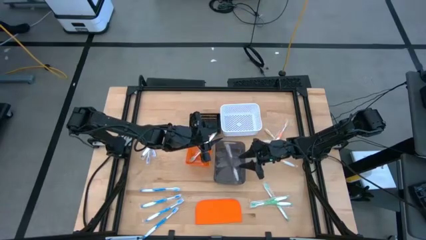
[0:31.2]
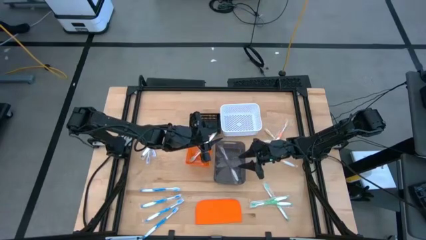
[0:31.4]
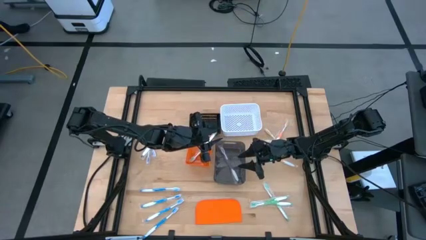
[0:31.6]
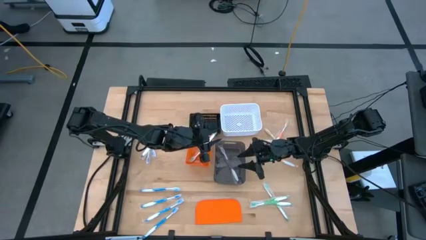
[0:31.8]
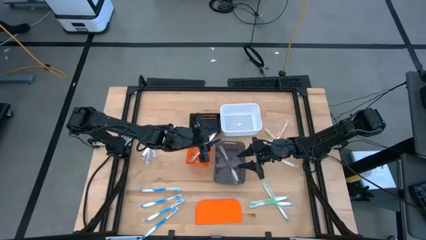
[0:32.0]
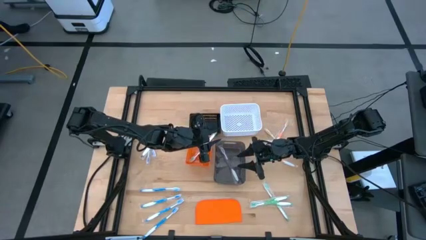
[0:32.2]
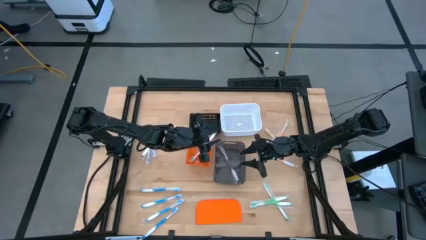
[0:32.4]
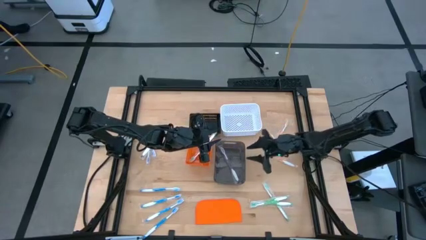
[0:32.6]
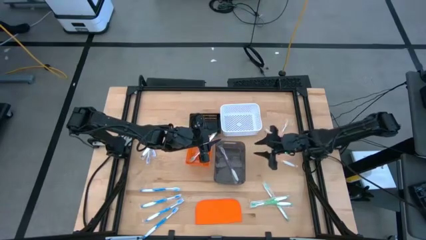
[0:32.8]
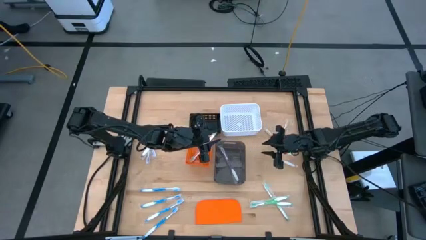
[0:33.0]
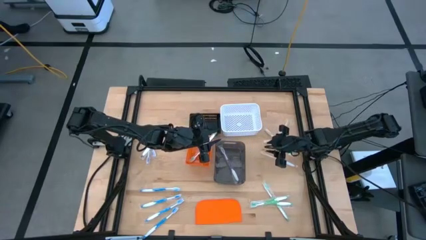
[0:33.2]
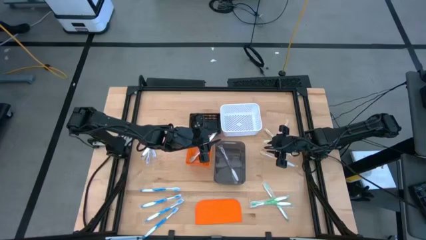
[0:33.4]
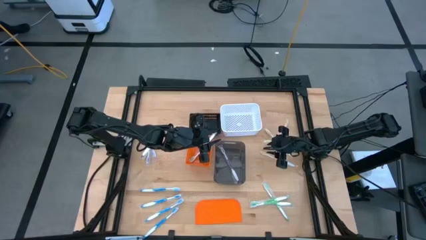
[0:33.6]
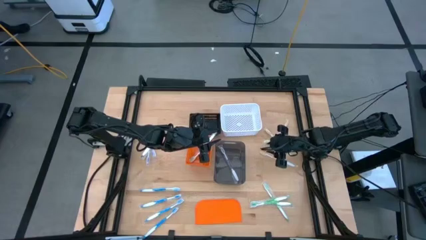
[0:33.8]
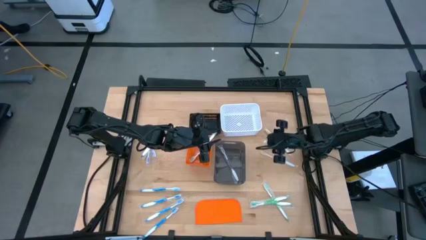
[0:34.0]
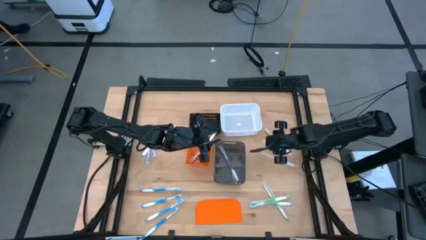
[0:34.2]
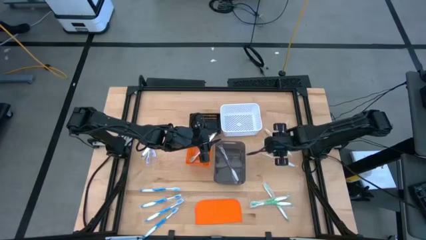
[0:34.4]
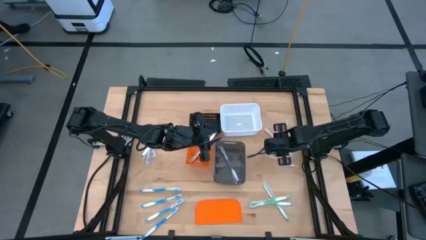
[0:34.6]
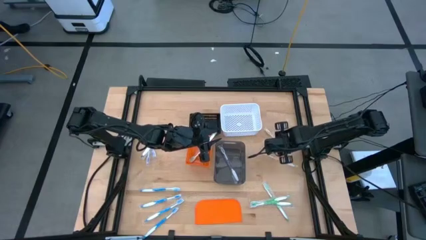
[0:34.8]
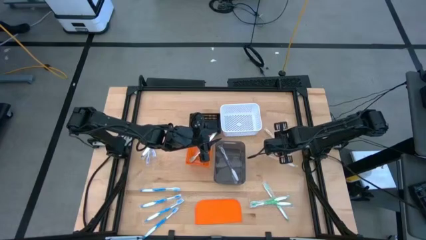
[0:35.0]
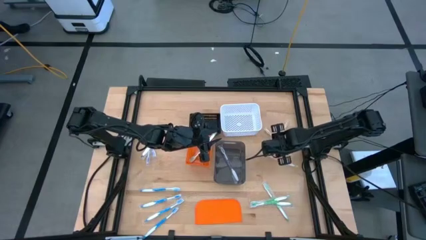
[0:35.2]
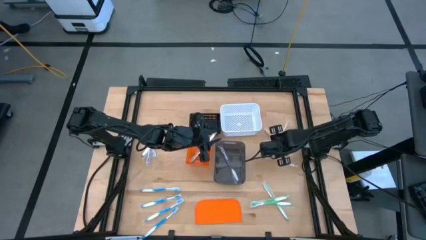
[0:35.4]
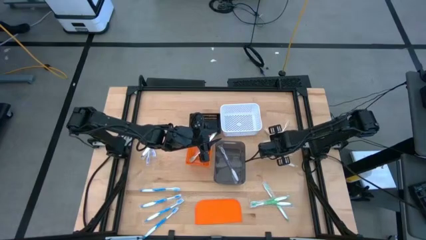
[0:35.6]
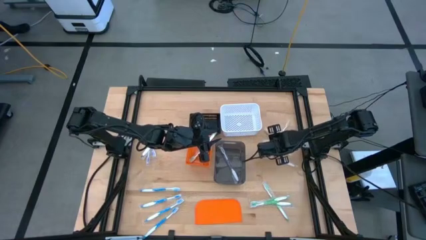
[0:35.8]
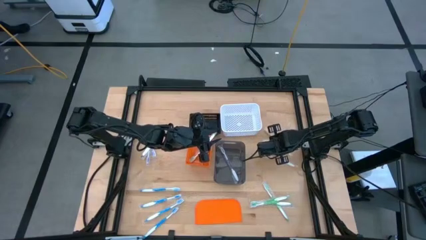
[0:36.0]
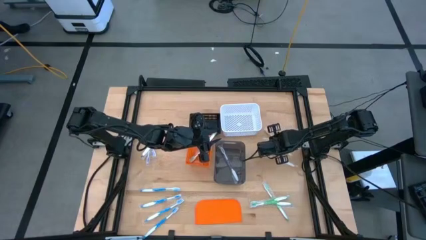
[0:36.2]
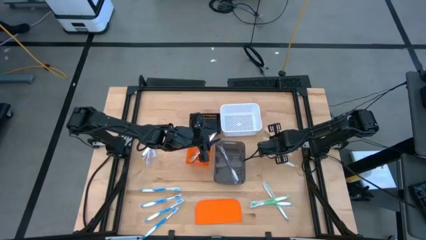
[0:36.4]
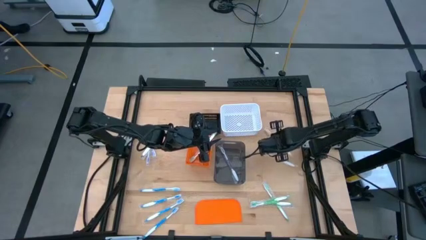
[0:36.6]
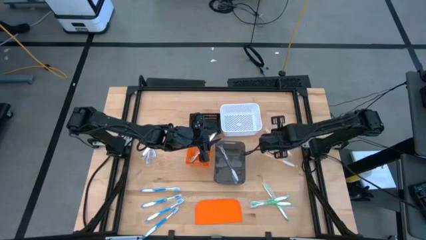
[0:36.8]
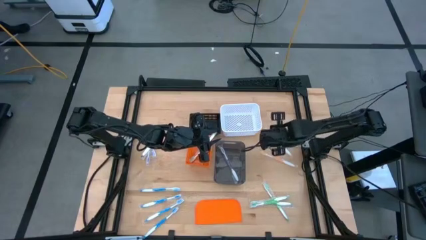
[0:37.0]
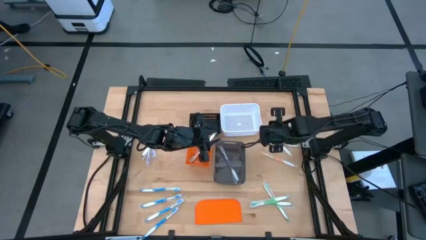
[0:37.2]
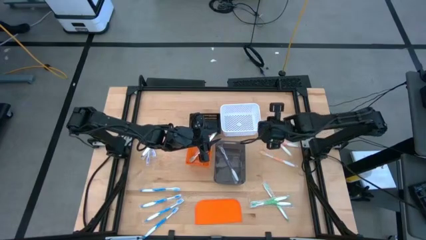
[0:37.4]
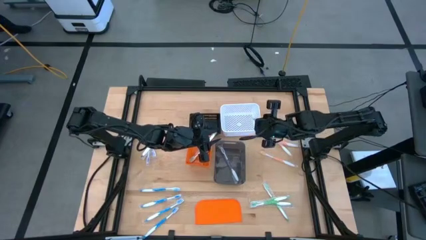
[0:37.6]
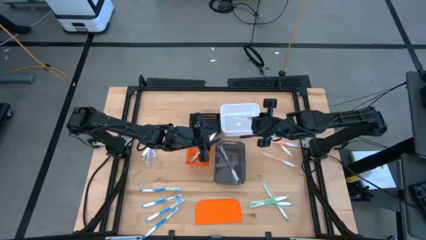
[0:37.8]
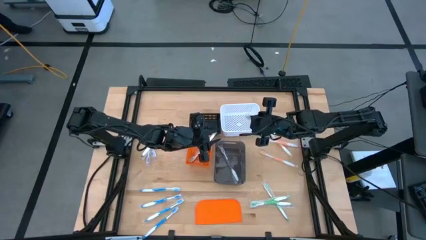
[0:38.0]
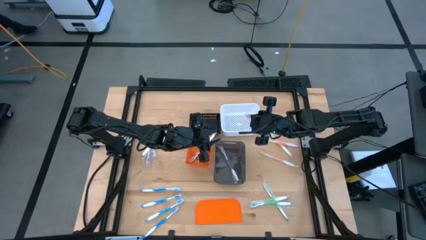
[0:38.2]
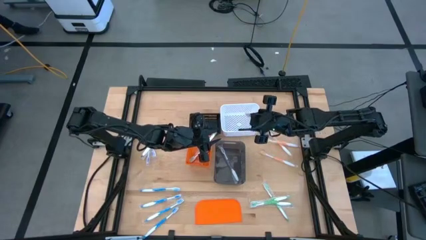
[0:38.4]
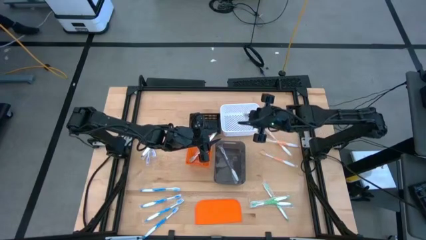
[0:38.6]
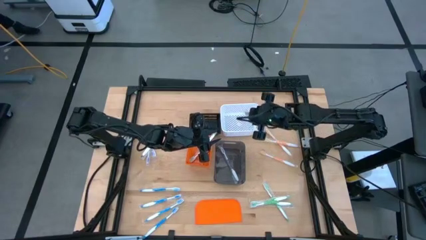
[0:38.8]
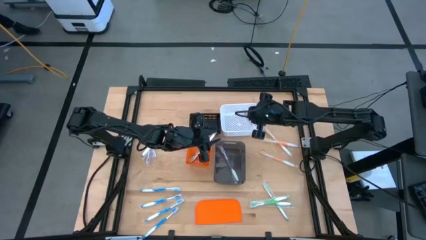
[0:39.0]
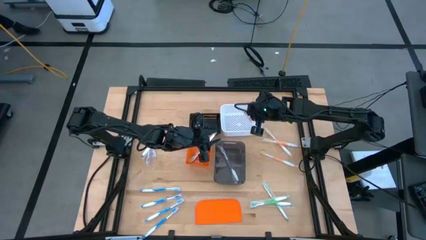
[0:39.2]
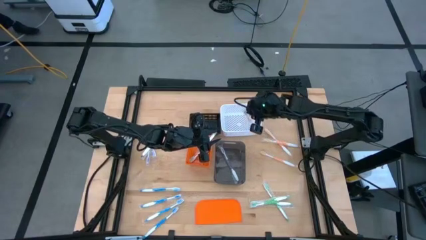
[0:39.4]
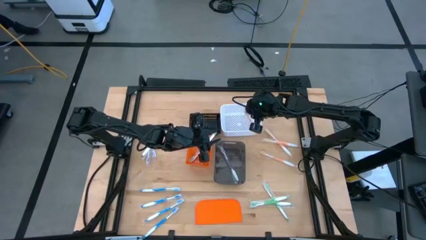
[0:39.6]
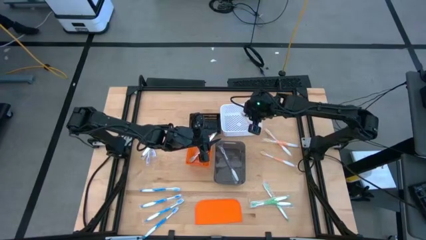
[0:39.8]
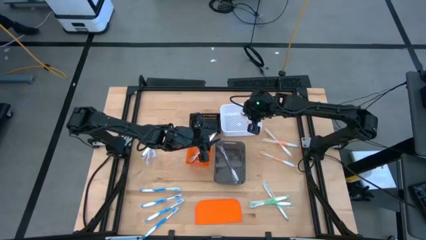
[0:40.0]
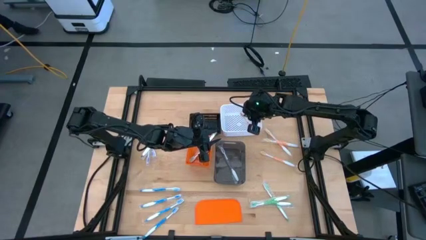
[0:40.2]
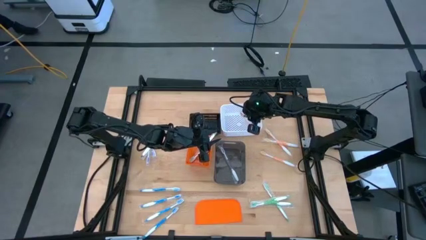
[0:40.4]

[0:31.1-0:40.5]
Task: Pick & Place Toothbrushes
Put the orange toothbrush into the white bin

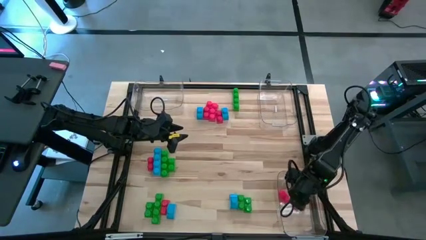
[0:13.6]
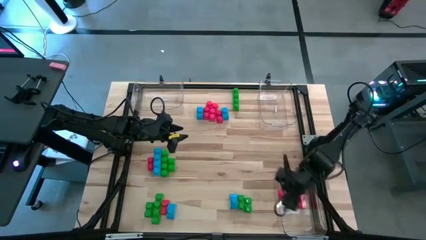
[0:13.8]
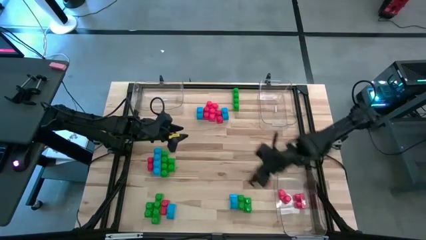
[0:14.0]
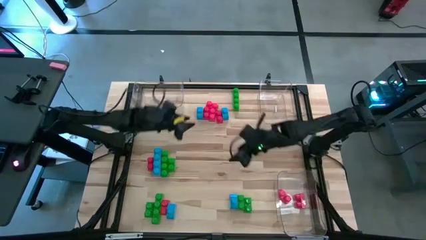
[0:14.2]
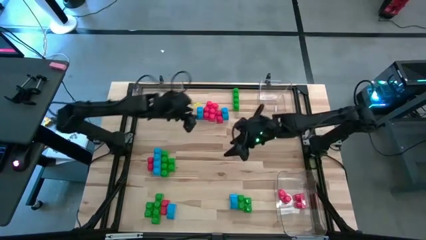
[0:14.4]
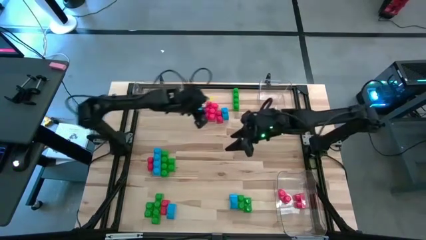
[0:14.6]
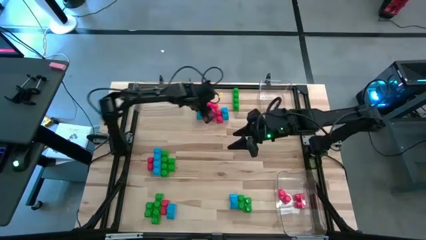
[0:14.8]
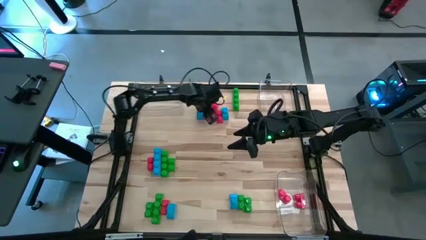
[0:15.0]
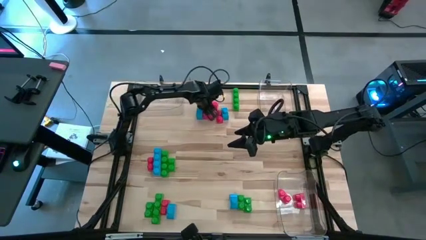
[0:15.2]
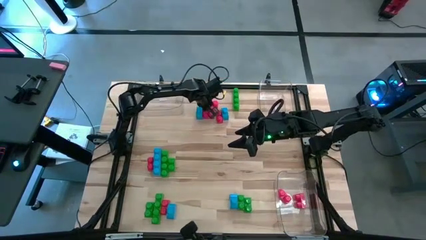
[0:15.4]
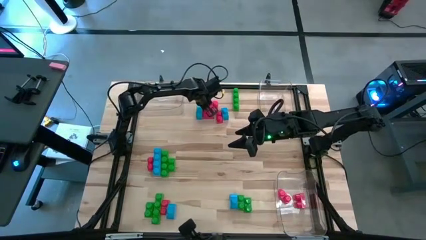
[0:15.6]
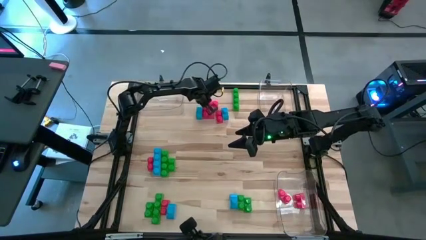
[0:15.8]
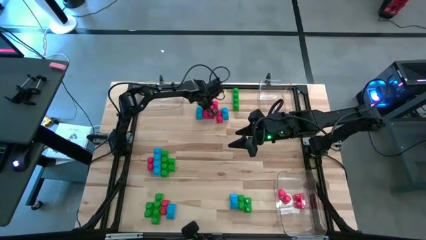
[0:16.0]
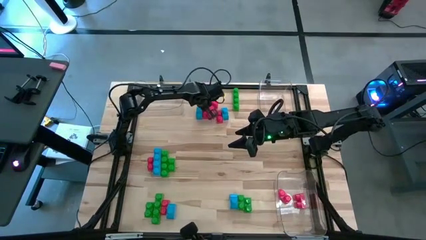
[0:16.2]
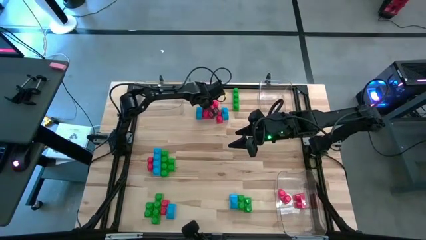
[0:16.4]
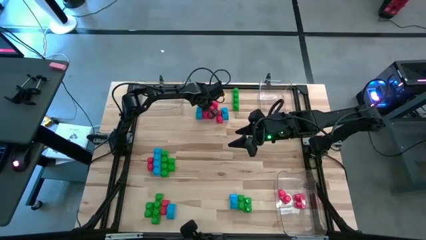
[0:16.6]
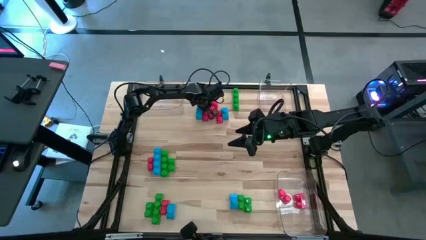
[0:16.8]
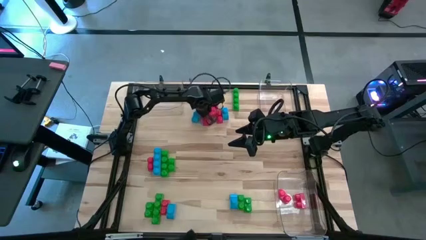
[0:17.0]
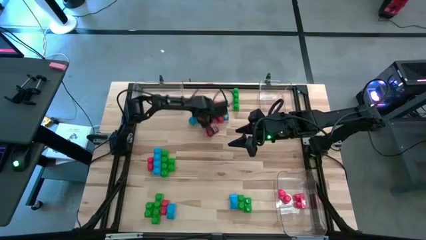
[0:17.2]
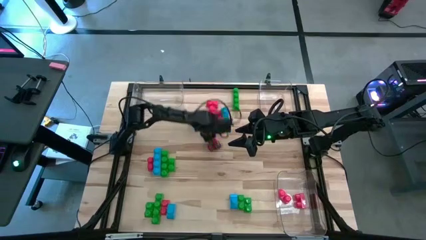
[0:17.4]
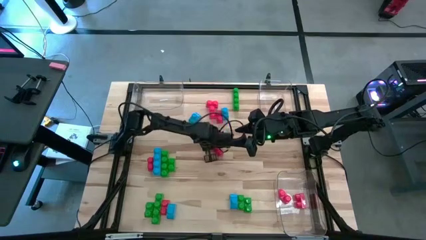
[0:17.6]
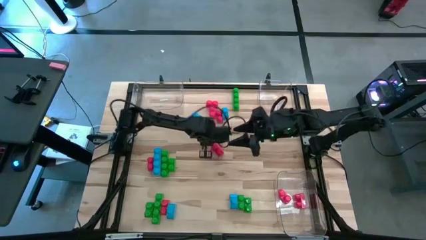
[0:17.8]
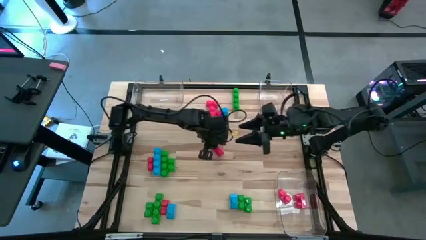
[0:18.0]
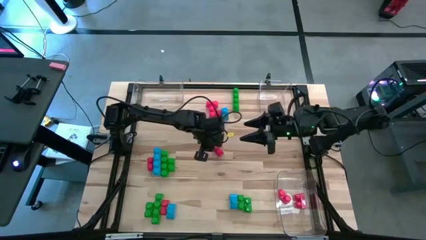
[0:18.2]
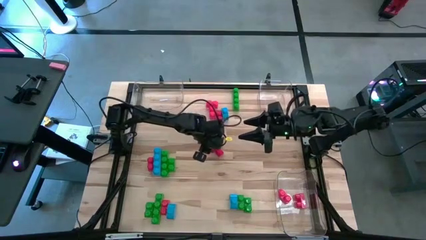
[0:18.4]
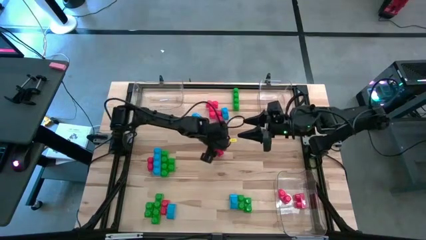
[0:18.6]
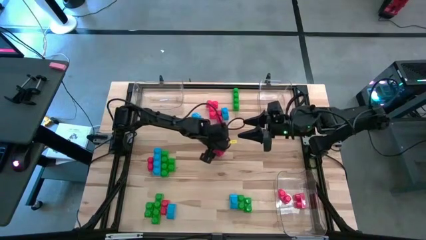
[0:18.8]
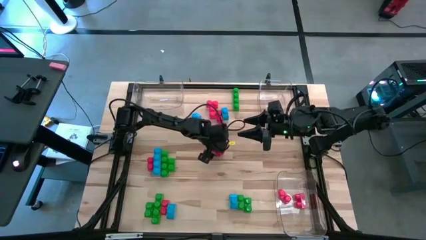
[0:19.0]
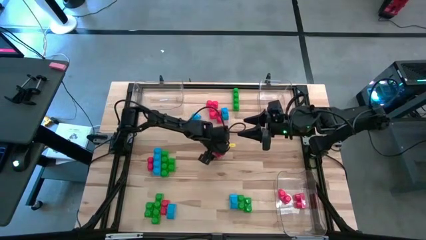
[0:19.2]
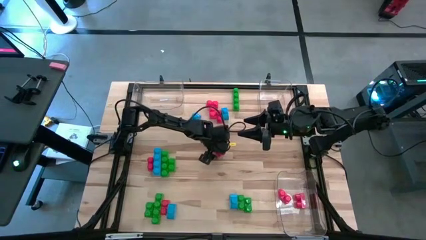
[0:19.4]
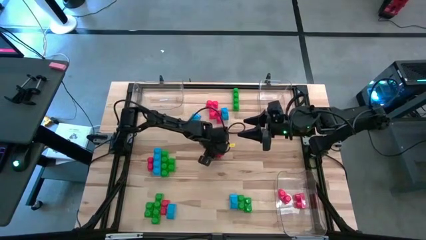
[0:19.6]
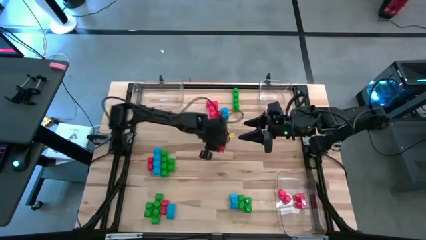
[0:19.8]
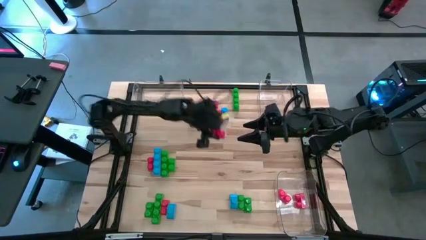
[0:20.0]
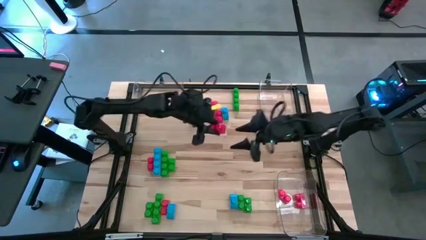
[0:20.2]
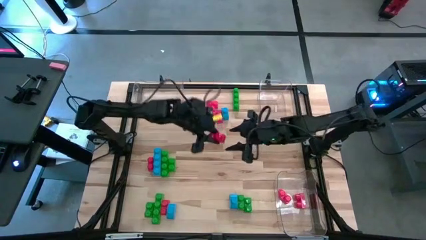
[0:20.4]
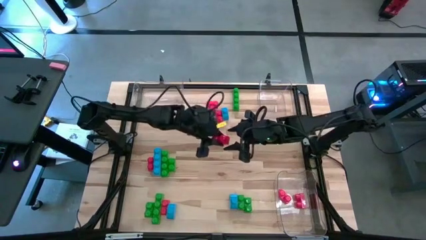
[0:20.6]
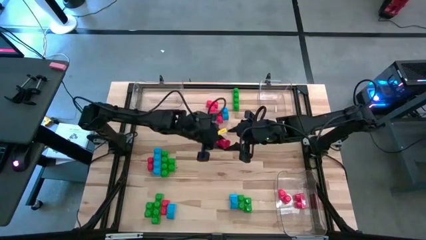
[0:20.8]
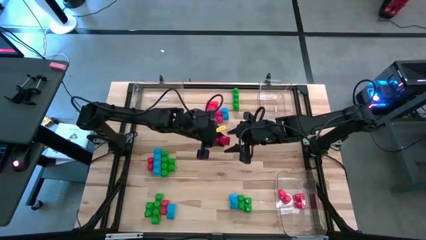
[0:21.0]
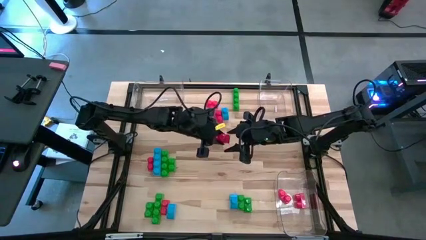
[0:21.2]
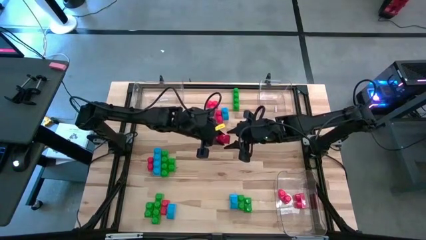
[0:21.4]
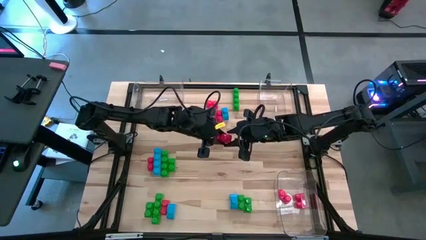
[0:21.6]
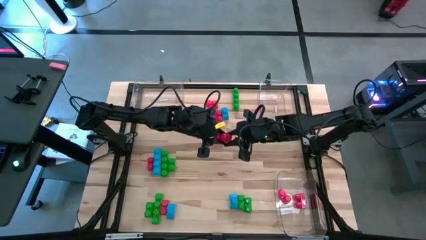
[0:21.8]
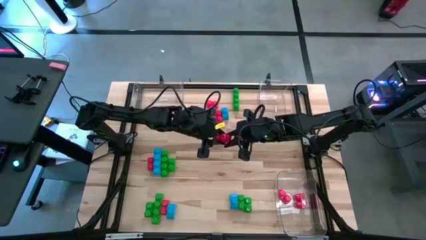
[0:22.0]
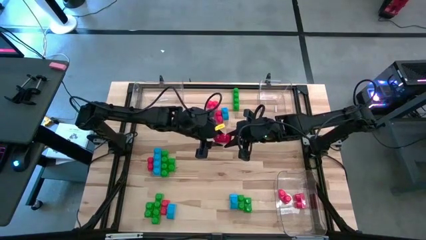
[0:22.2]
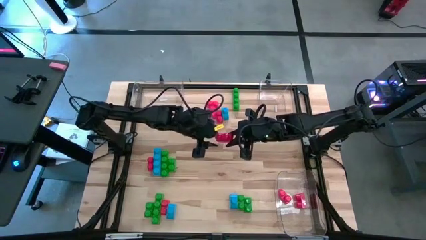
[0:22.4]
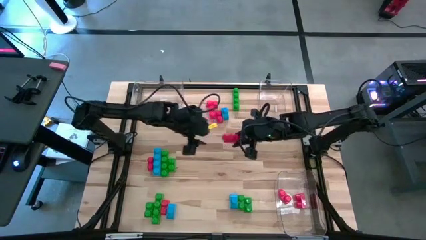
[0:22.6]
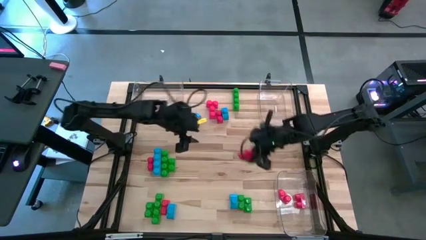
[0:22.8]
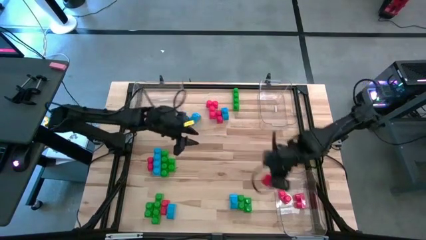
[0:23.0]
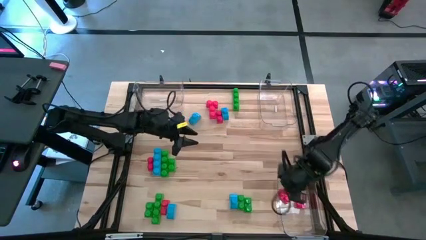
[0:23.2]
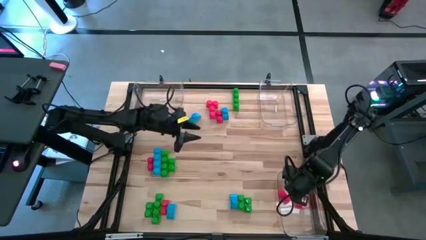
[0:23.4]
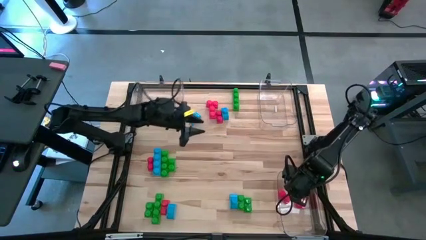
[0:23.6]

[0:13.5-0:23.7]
Task: Sort blocks
Put the red game piece into the bottom right transparent bin
